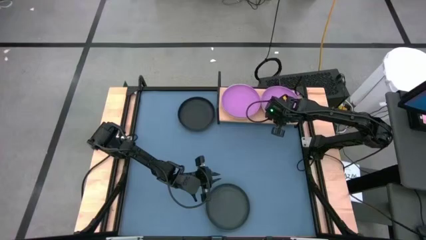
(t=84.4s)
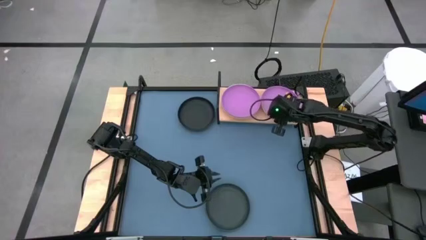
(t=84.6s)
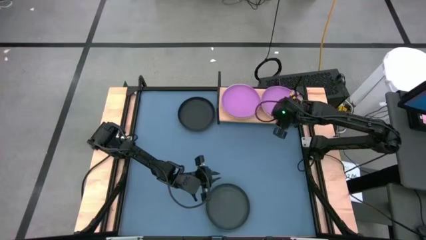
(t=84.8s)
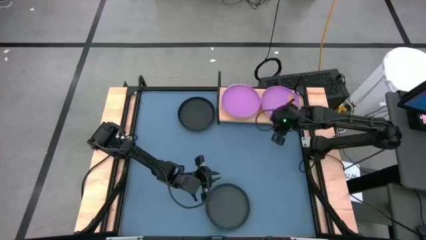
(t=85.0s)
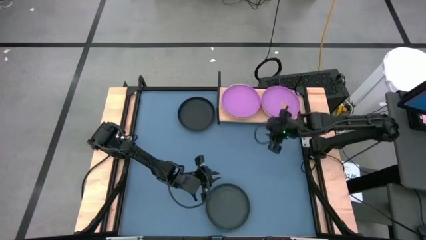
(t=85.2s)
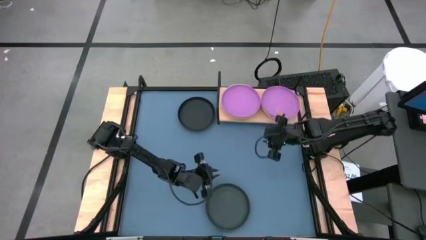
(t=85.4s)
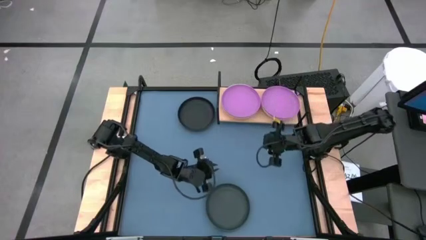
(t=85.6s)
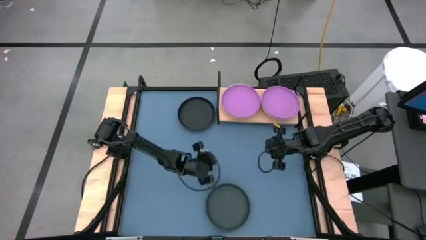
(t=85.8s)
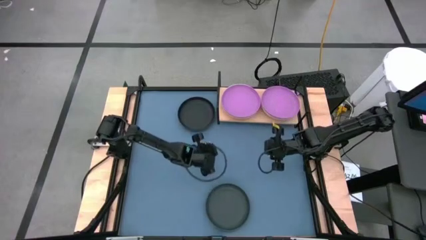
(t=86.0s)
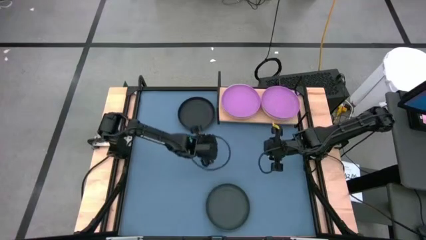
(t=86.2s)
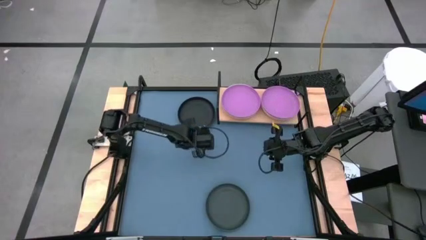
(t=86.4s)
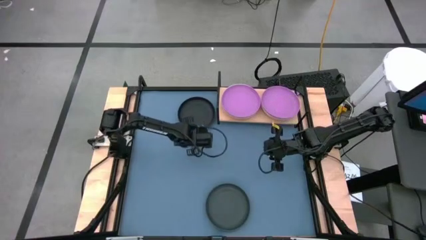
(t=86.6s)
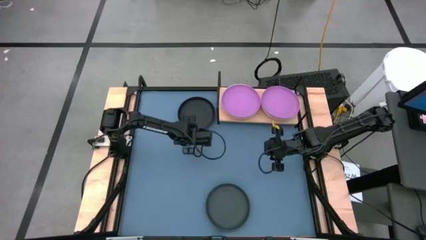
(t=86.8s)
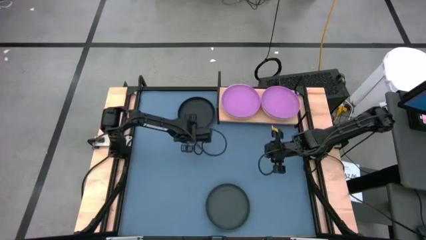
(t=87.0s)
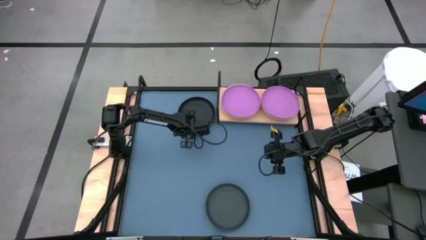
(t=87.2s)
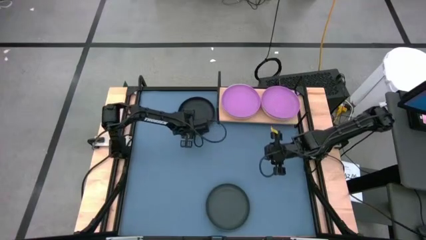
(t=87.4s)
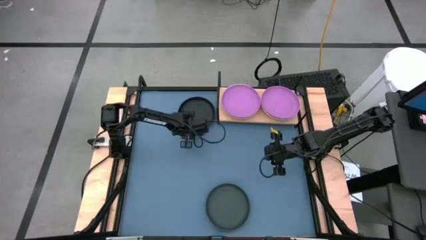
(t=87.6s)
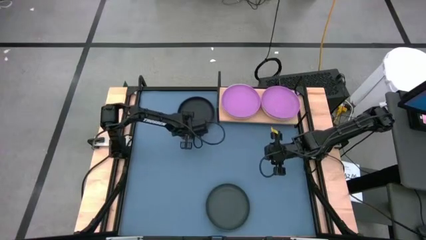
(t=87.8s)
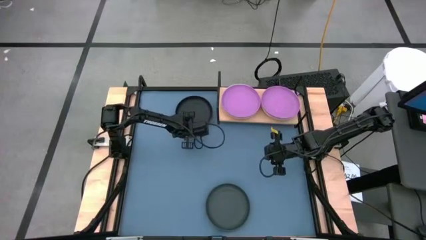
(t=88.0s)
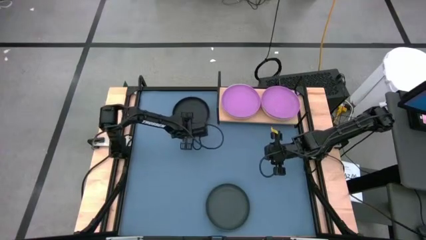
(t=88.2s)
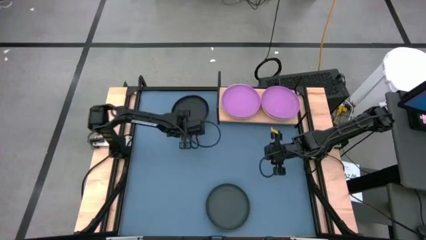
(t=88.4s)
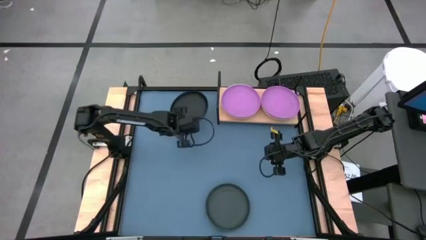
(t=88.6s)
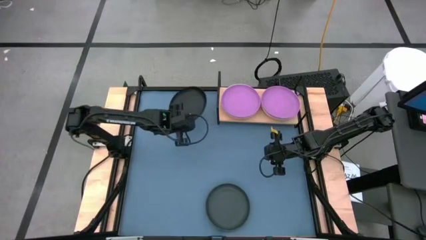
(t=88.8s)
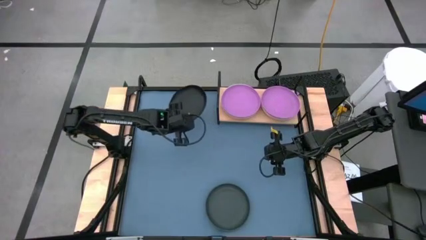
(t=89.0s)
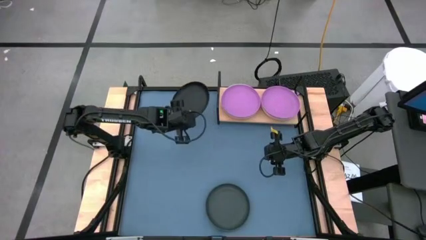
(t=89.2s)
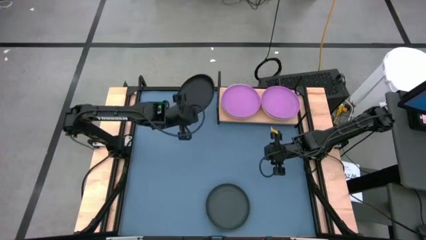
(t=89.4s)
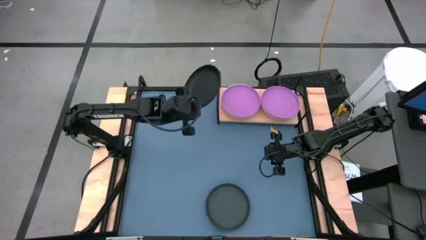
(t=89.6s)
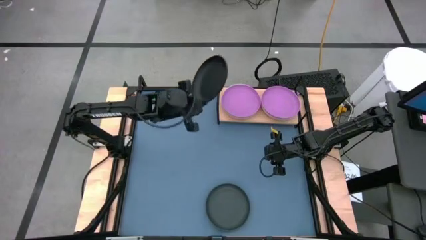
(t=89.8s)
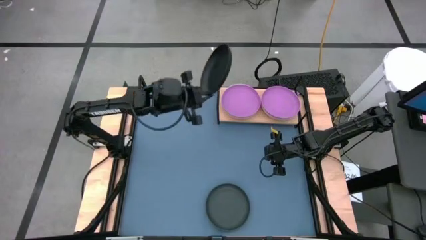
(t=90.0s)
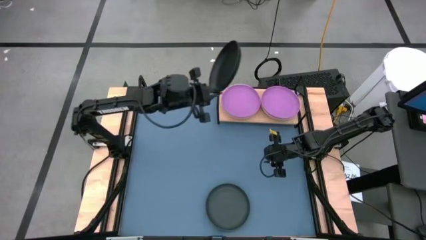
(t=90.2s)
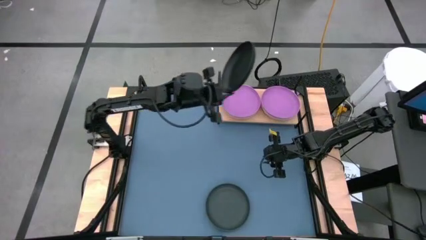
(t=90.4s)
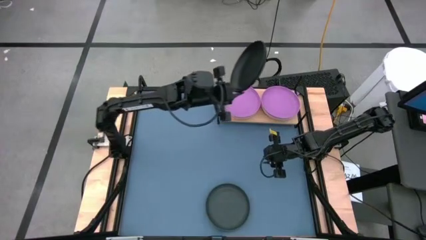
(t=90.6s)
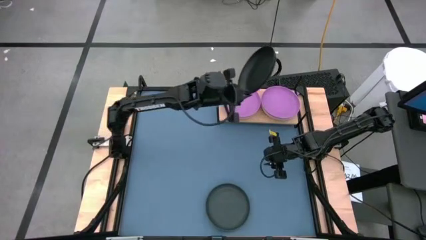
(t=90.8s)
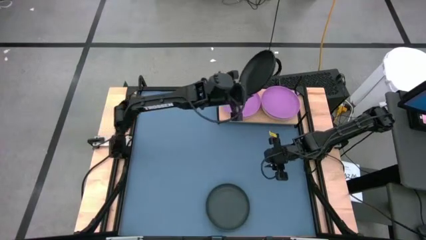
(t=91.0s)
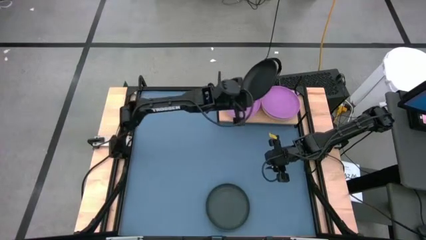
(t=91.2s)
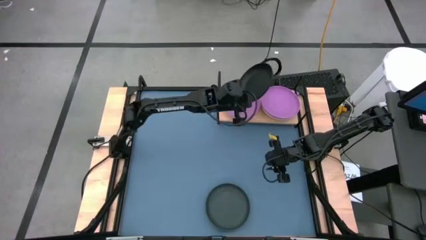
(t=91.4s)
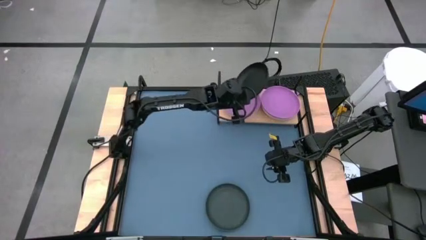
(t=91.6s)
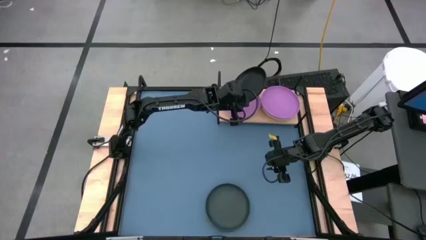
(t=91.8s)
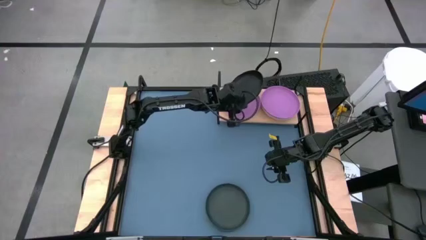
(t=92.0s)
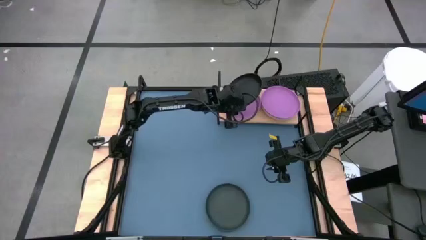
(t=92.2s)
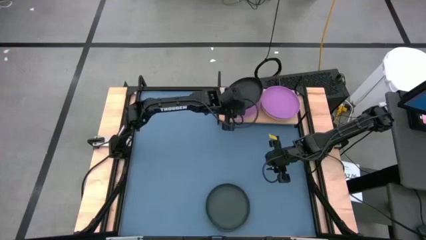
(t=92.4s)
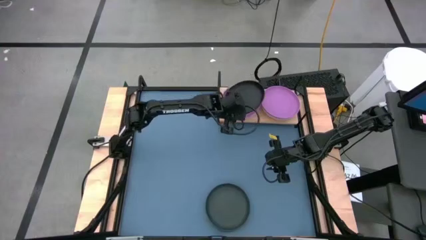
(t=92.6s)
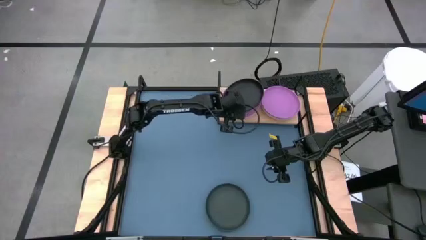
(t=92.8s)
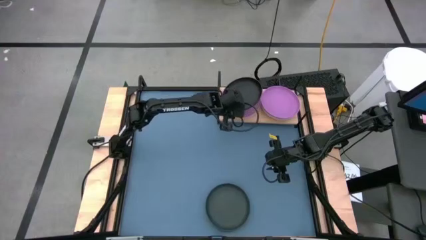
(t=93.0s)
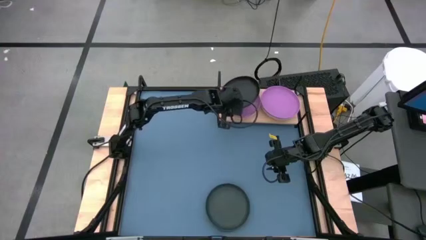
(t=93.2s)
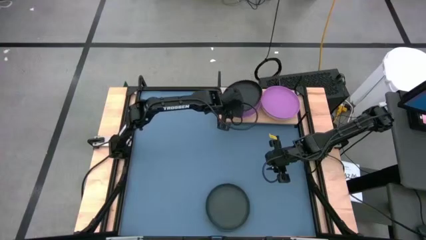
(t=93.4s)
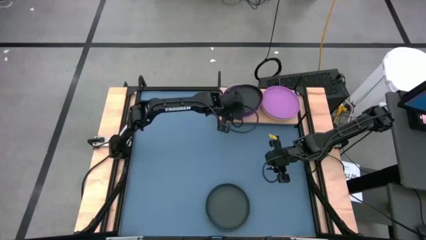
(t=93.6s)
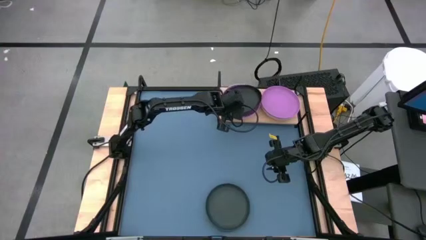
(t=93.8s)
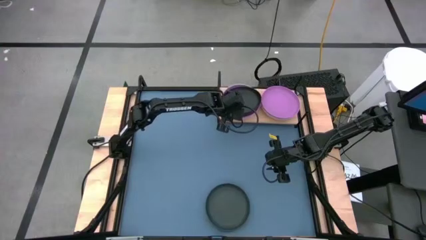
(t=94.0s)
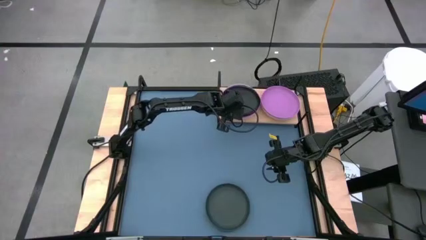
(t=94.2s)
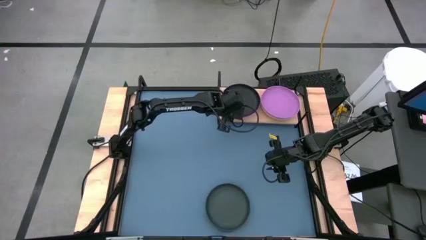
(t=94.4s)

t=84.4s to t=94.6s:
Task: Place and stack plates onto a shelf
Stack the top black plate on top of the purple plate on the shelf

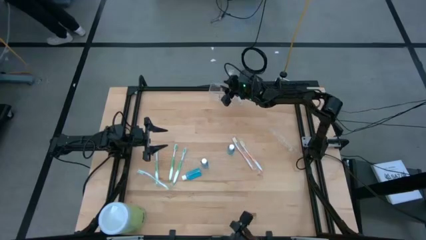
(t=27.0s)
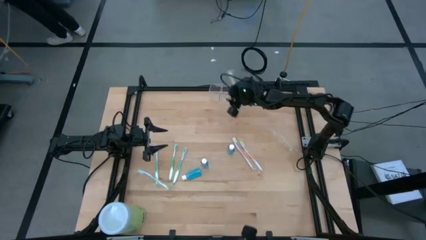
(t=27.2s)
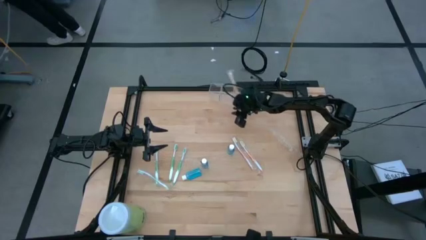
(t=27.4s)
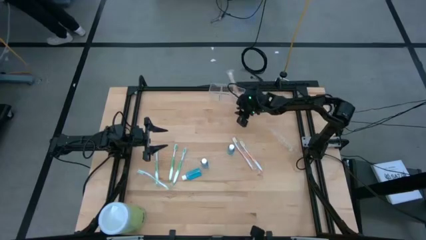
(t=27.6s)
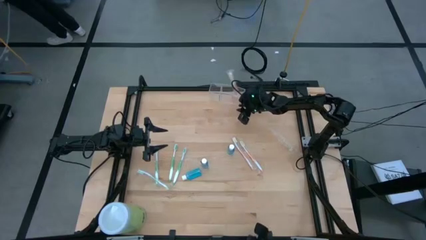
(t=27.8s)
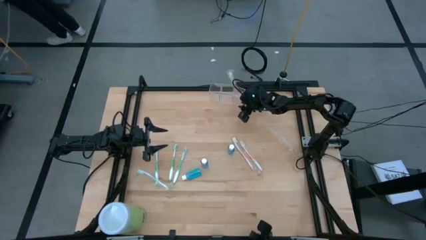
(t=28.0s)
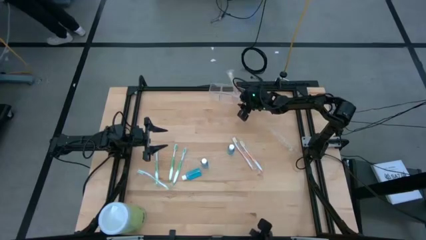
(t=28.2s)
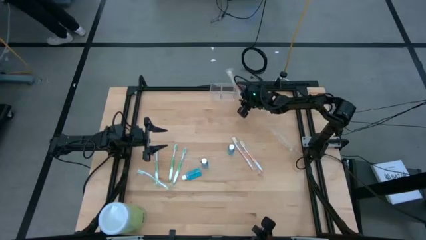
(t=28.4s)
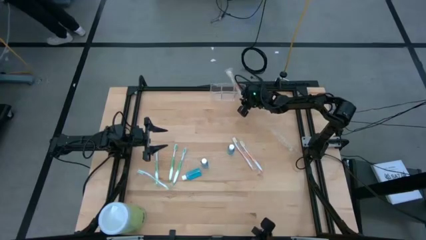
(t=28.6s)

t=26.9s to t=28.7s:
Task: Pick & Place toothbrushing station
Adjust the transparent organizer

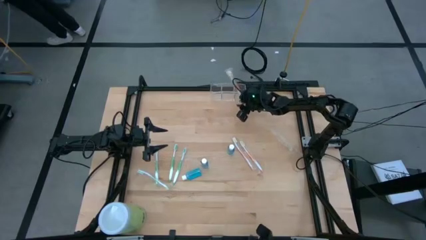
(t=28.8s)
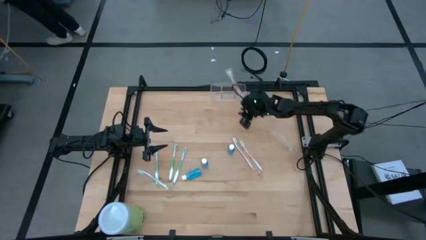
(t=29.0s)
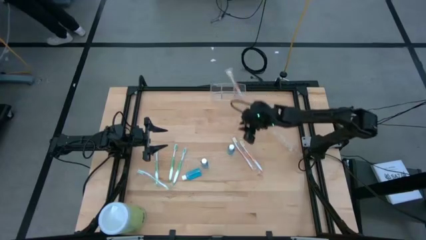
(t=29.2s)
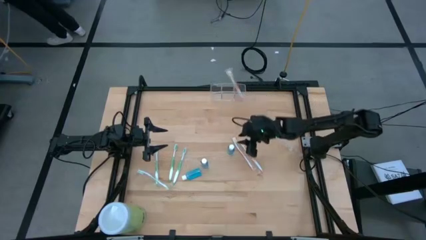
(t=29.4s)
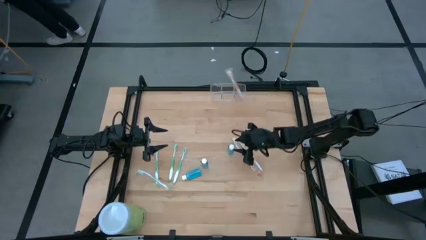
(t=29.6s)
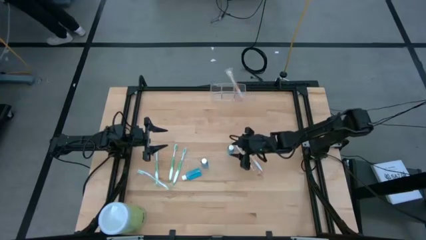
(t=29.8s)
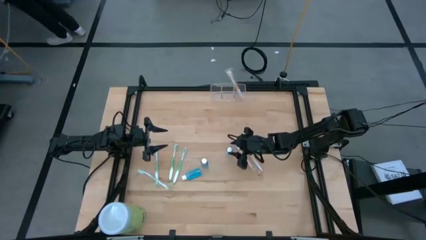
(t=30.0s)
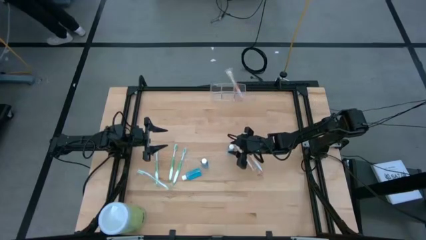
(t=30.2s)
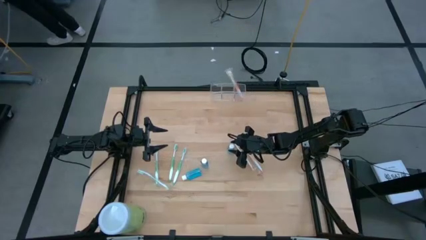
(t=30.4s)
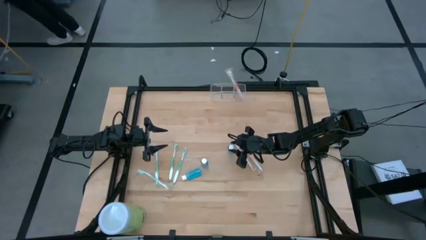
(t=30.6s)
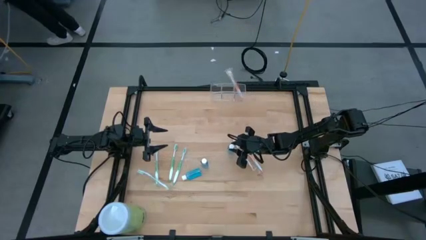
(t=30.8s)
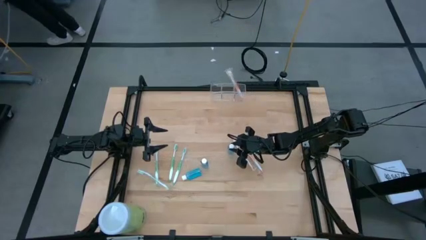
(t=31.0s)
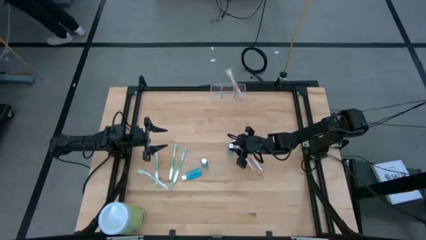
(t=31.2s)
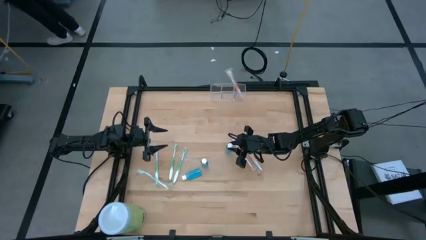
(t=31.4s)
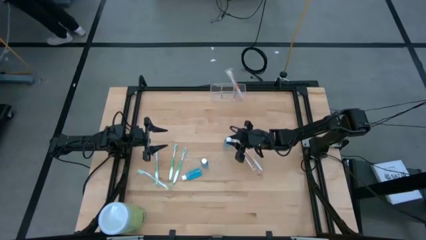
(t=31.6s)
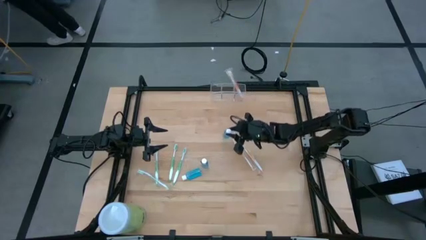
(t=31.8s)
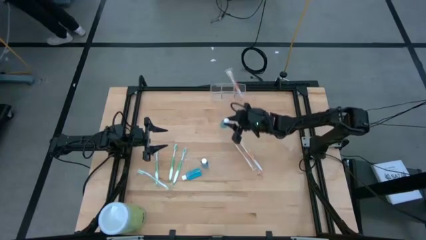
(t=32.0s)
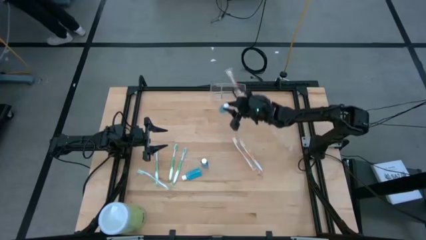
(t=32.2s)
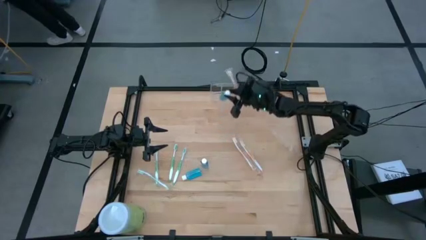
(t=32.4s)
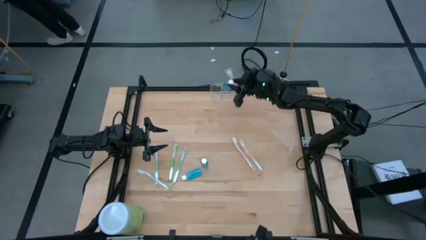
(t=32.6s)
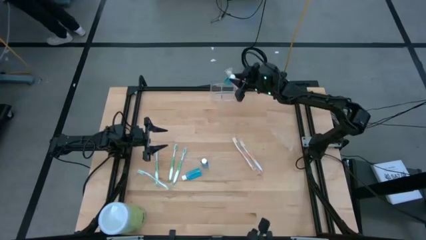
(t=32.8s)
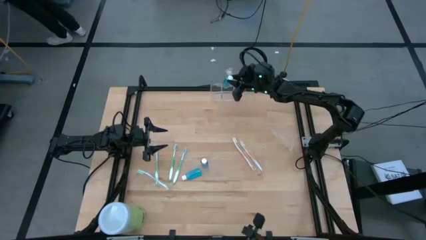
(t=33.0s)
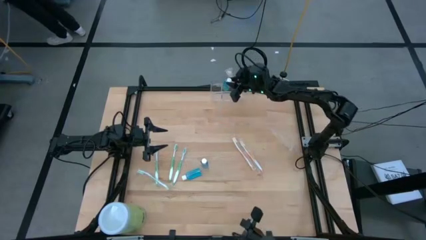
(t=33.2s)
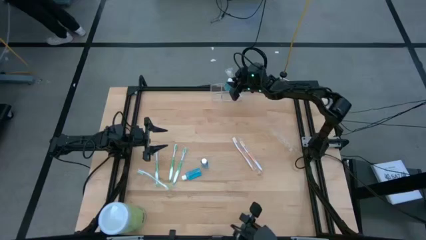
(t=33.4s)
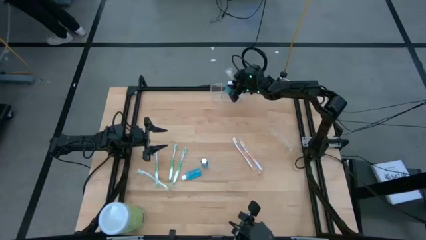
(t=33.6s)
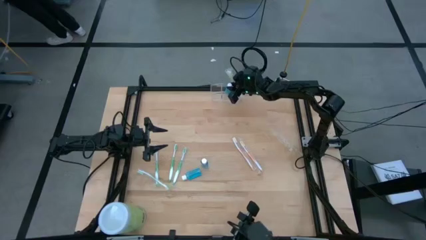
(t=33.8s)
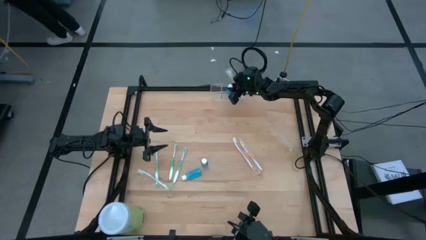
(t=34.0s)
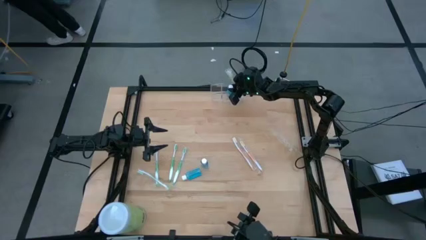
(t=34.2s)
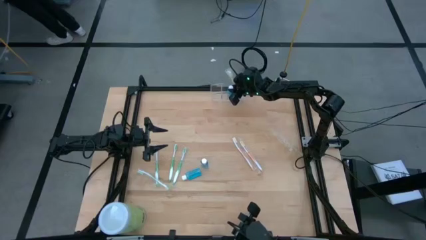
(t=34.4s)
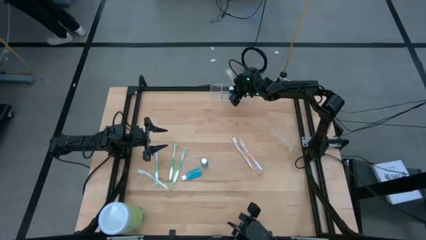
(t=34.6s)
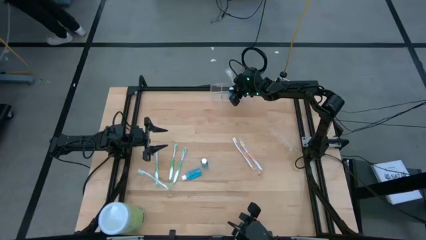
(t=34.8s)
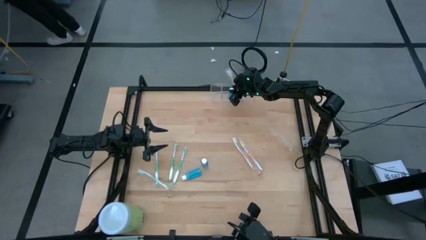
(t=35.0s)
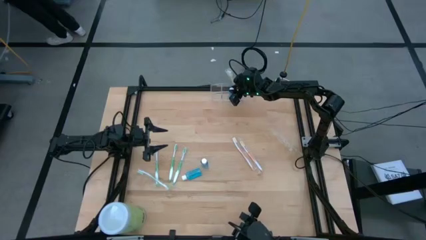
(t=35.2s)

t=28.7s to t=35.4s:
Put the blue mouthwash into the transparent organizer
